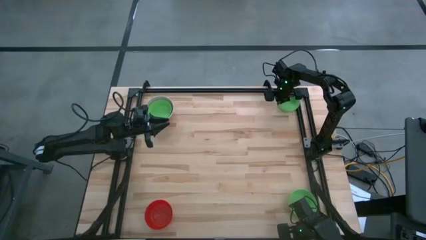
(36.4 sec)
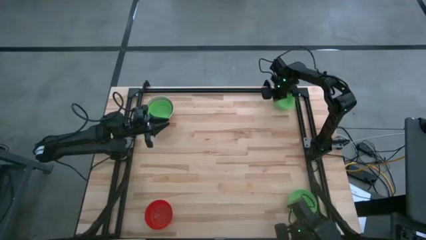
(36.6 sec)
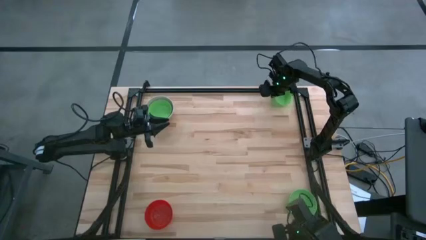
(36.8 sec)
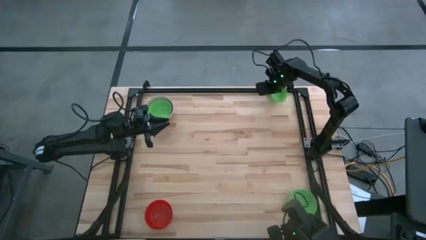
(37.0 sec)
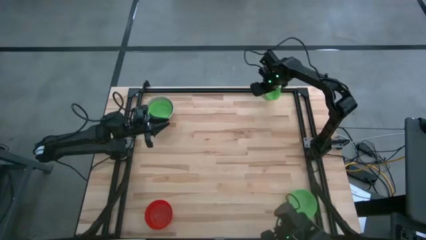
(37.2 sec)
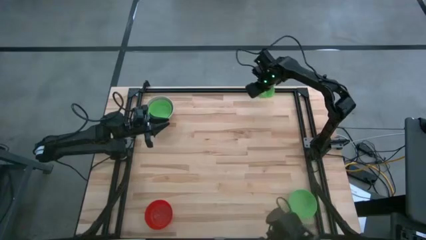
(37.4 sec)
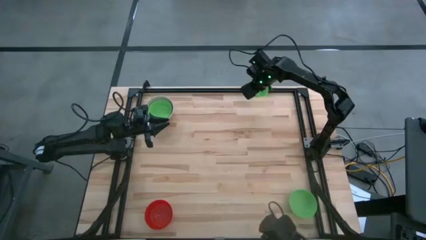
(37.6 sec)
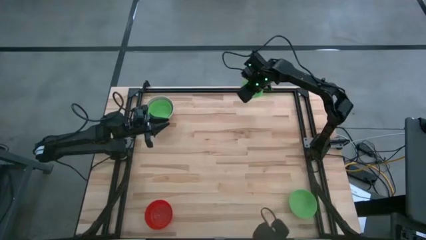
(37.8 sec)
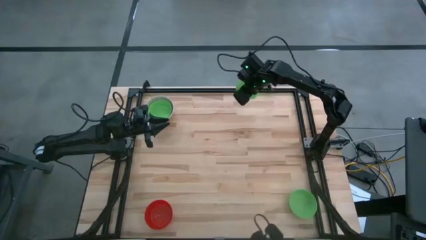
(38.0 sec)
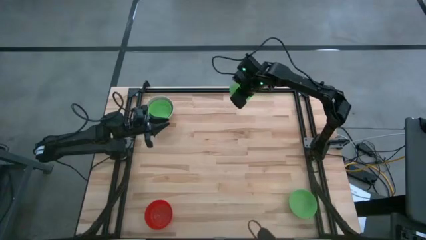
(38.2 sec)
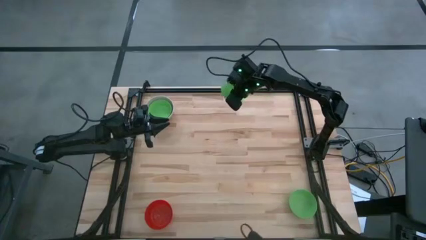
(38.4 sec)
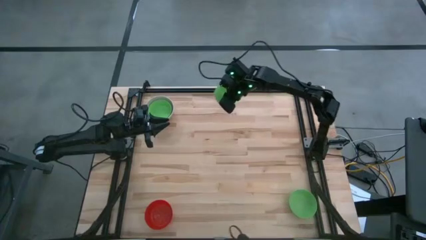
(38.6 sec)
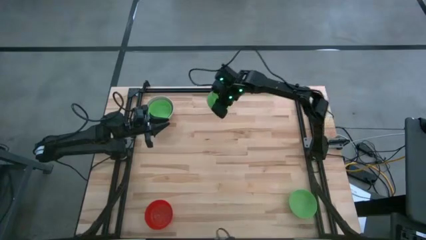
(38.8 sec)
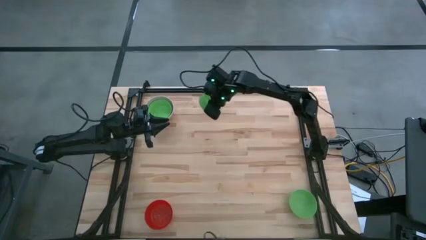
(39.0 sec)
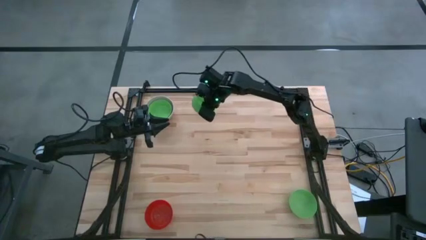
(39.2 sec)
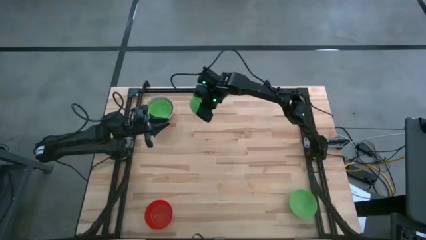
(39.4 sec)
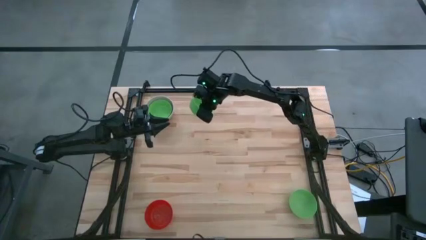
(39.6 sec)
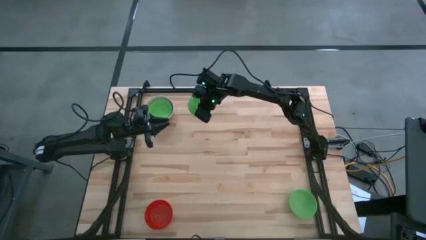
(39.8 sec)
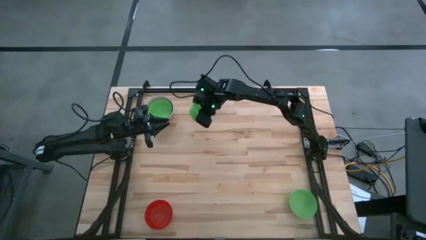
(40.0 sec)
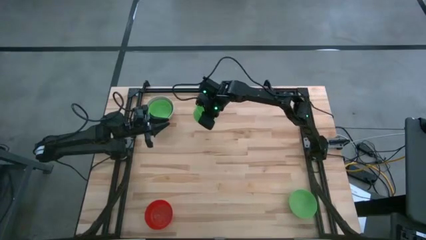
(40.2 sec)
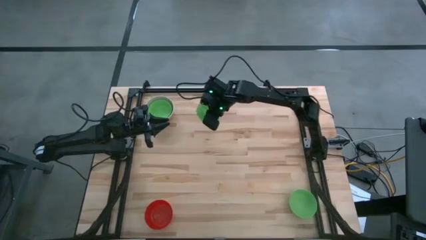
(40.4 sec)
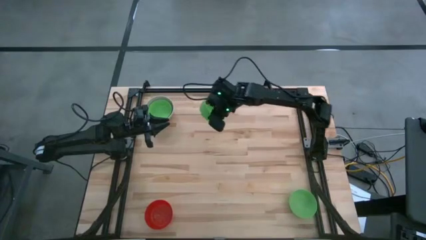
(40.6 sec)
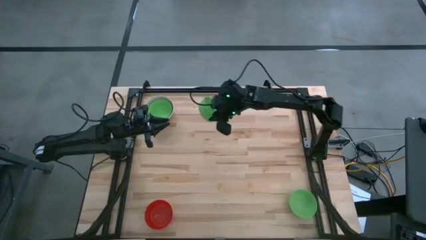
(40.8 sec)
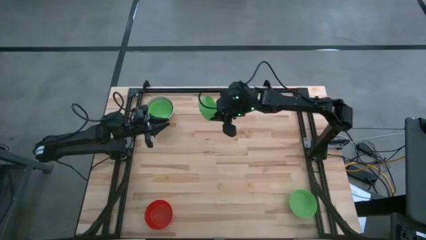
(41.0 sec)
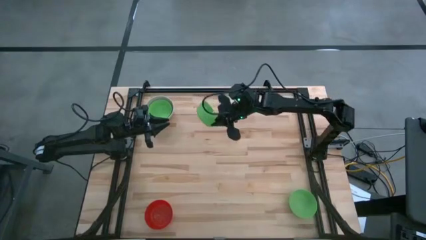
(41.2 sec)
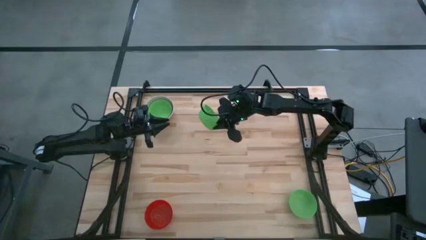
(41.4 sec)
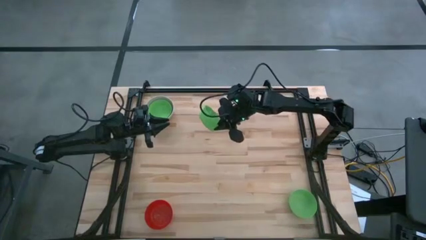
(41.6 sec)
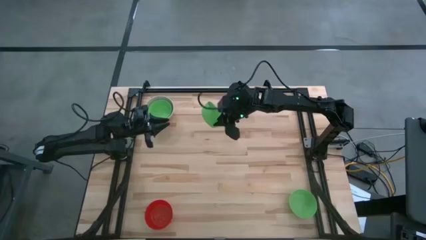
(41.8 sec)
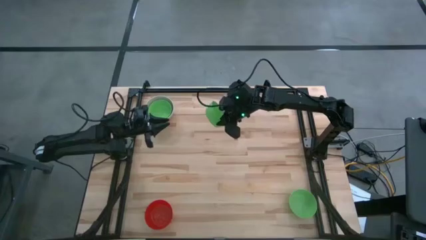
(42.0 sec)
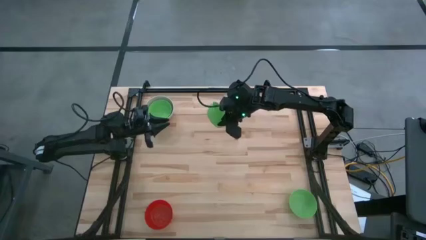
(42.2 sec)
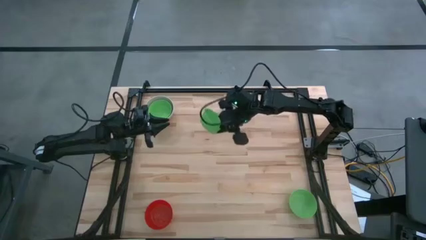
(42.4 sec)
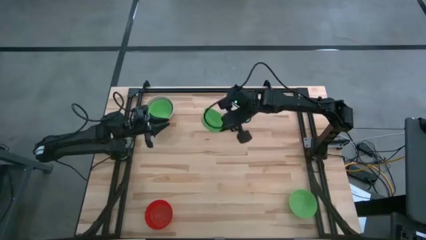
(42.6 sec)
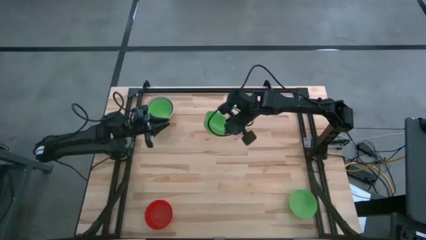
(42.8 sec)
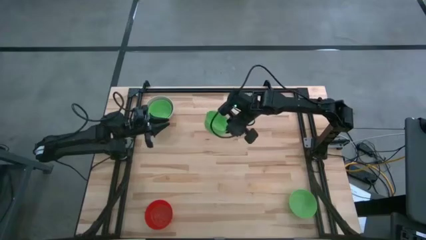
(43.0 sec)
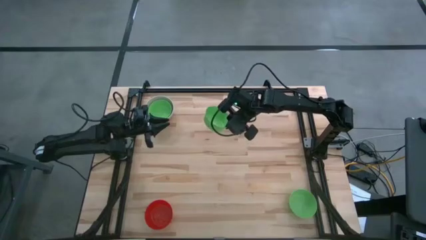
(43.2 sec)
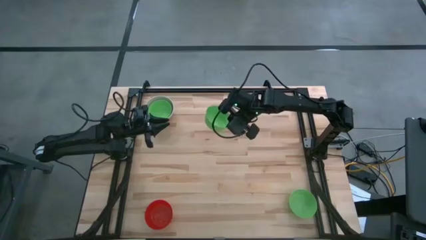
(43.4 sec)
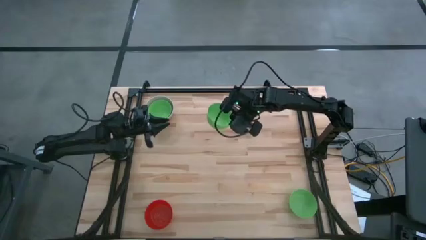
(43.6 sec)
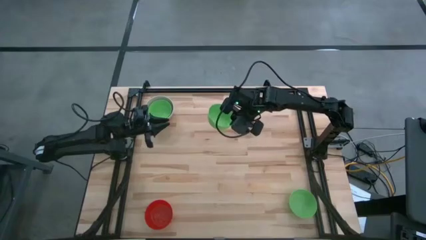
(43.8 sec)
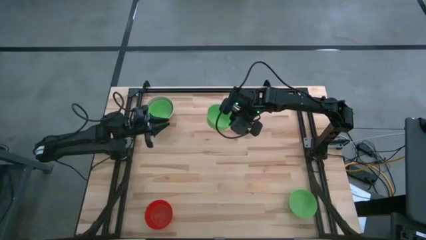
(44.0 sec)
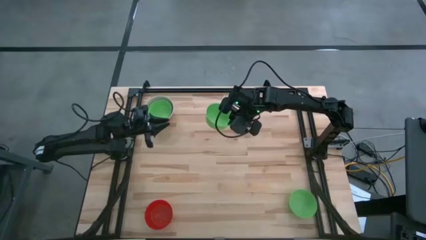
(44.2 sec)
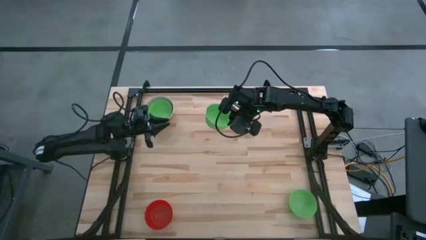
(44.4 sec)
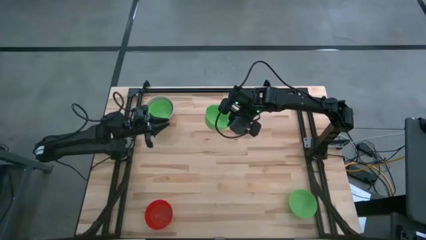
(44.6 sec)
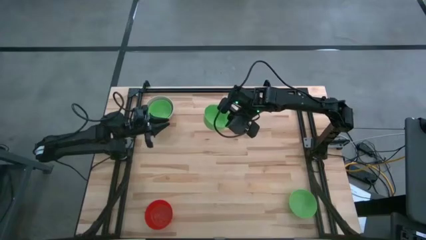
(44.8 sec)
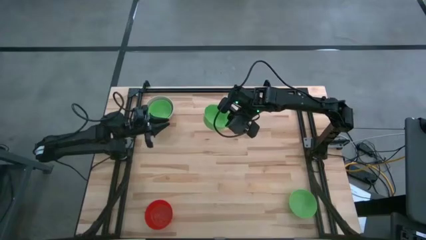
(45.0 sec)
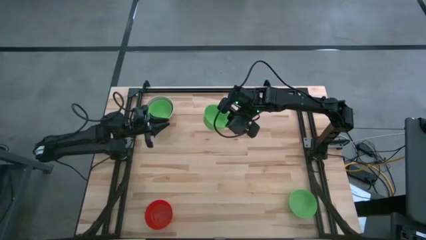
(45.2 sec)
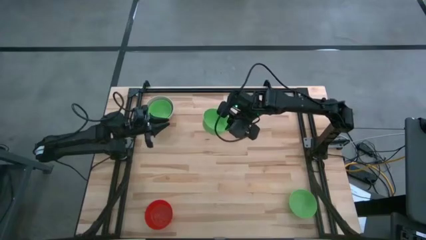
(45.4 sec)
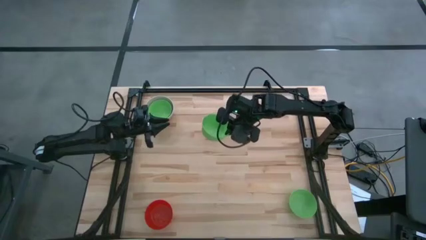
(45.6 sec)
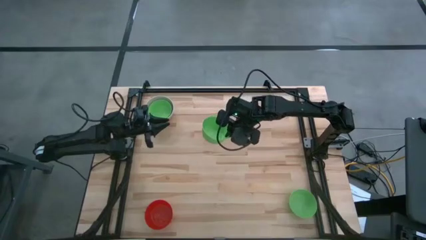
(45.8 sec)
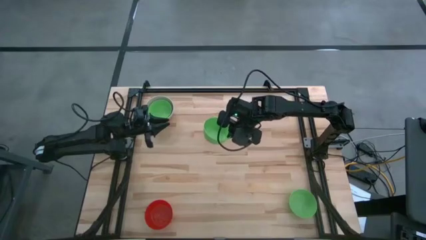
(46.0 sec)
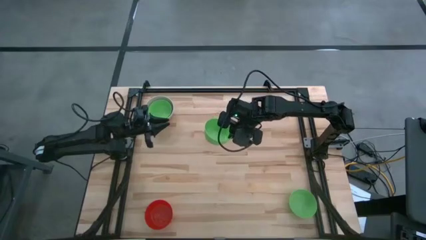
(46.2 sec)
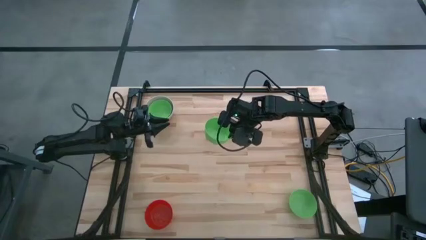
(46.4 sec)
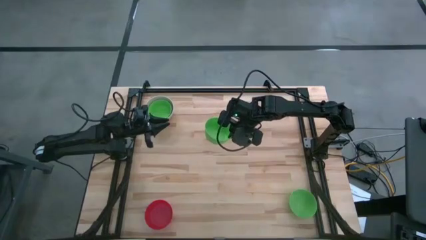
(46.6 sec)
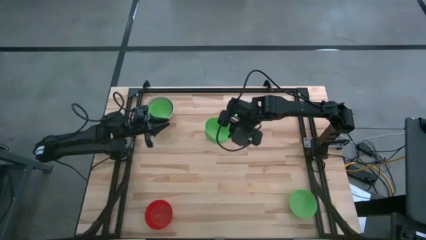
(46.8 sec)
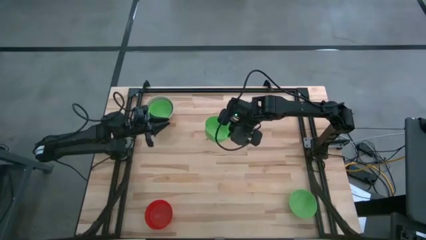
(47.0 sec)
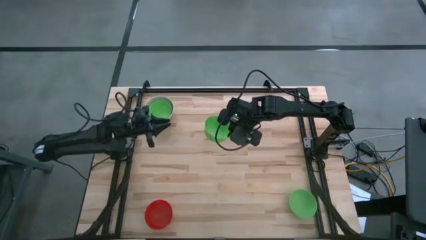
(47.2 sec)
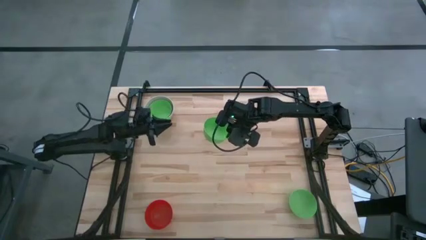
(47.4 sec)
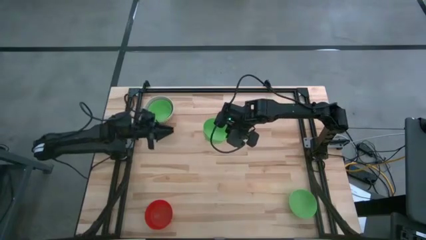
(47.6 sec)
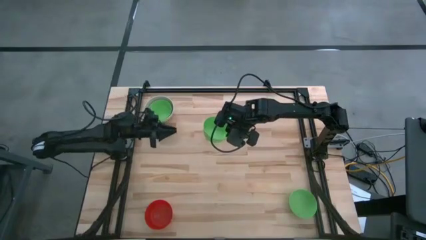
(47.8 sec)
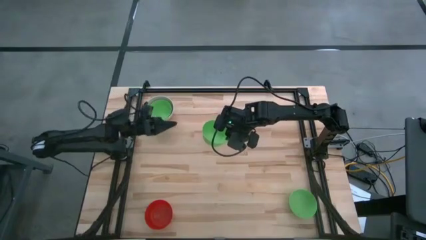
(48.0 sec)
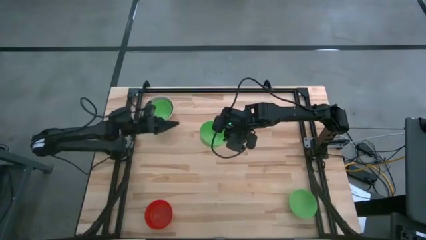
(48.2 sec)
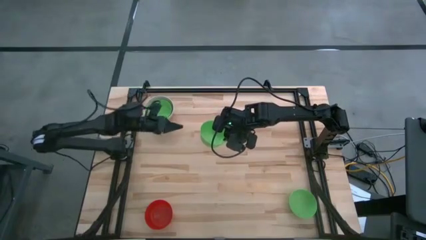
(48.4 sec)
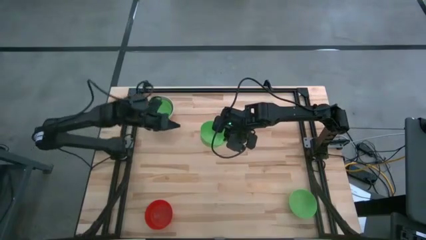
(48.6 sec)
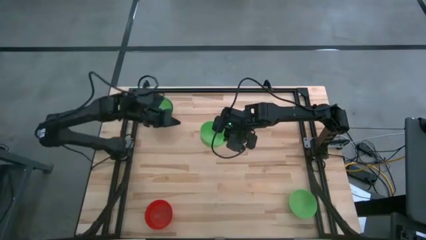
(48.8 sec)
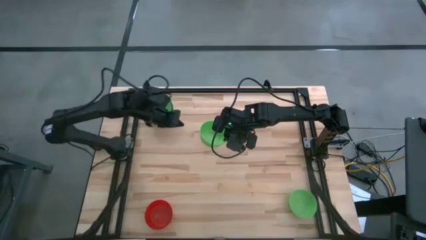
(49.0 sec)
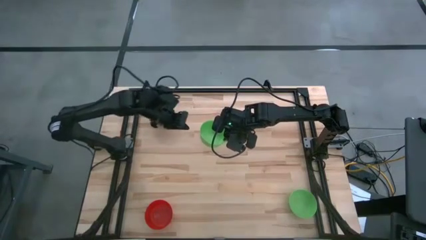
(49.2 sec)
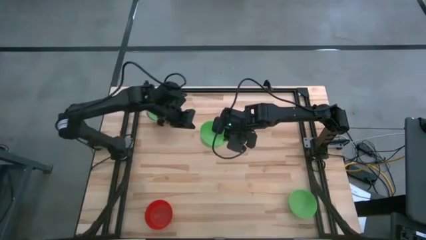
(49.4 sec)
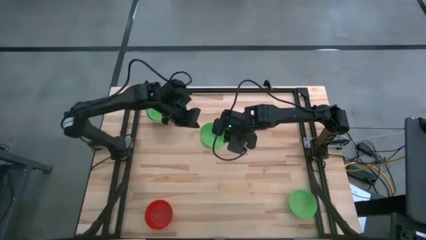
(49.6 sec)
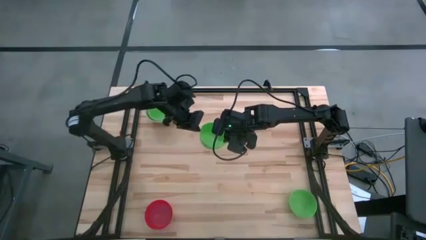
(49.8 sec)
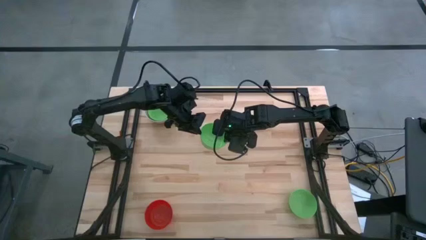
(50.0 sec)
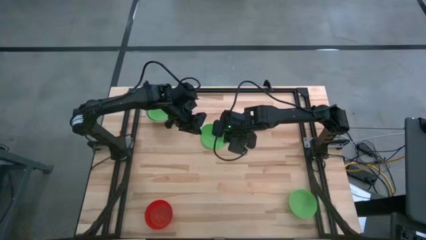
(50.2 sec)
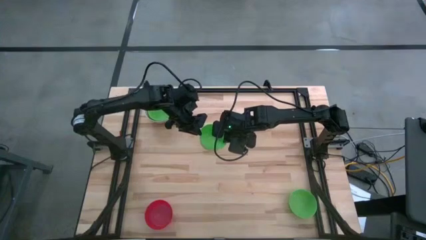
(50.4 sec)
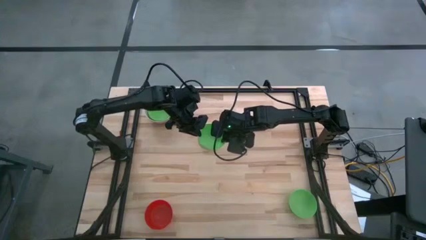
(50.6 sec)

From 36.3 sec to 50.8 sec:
Stack the top green bowl on the stacked green bowl
